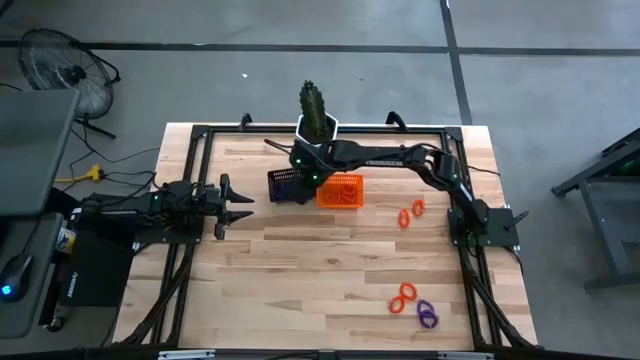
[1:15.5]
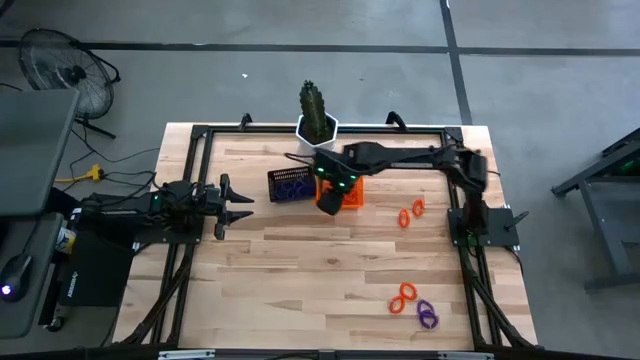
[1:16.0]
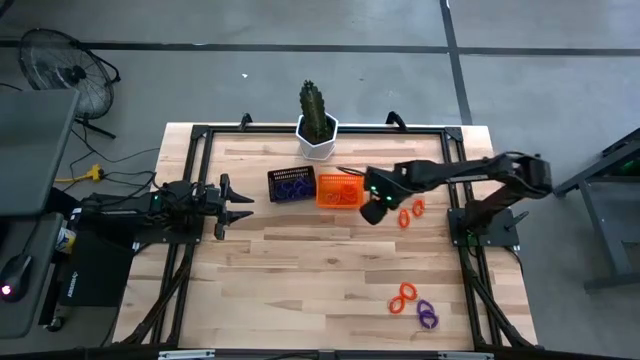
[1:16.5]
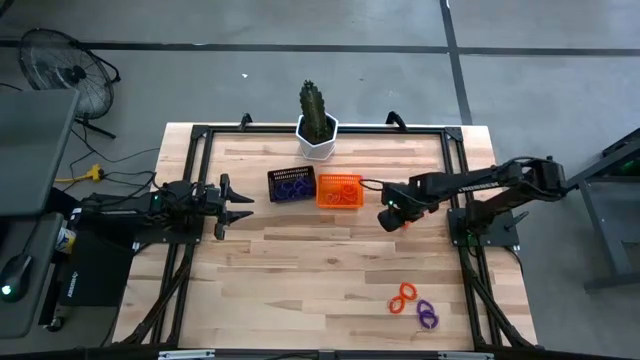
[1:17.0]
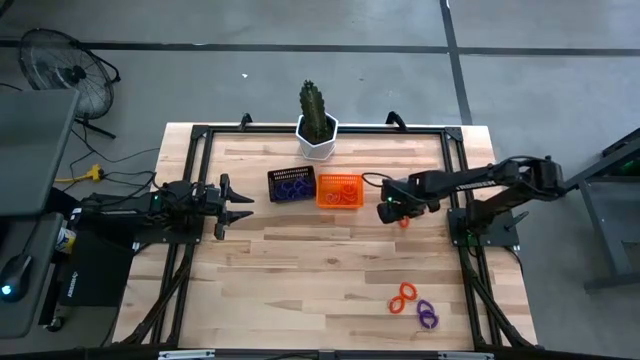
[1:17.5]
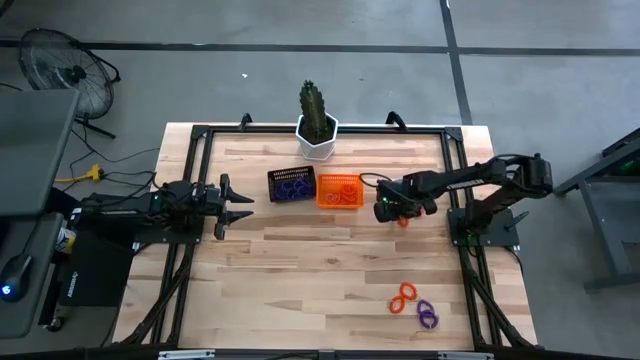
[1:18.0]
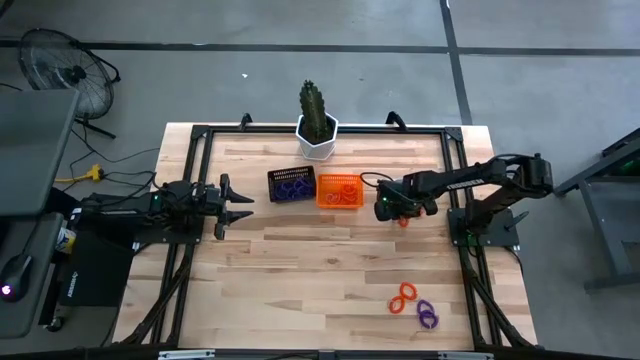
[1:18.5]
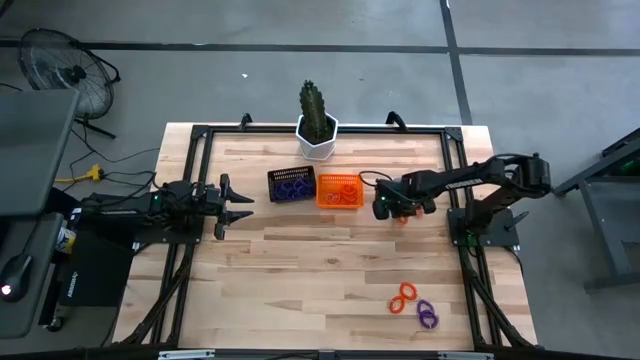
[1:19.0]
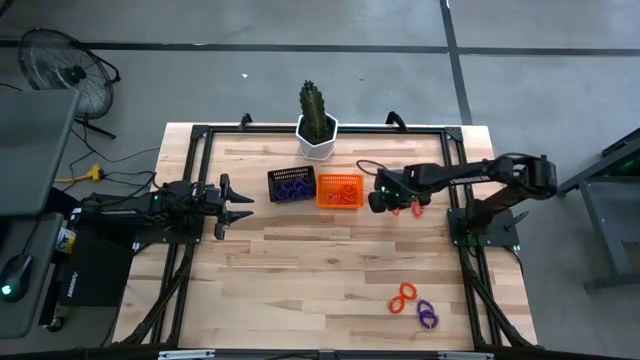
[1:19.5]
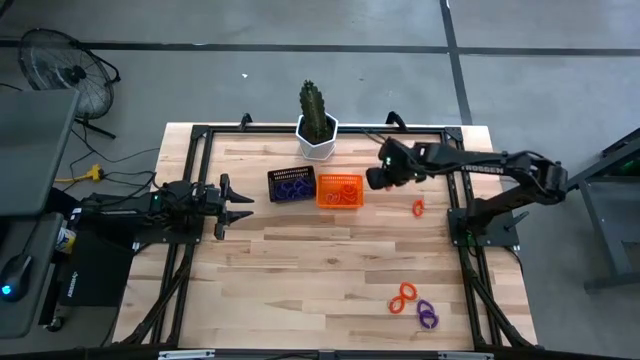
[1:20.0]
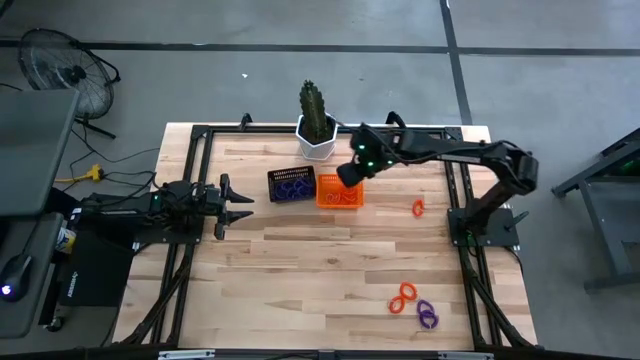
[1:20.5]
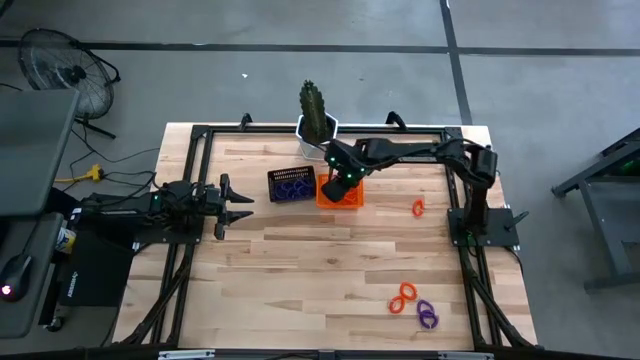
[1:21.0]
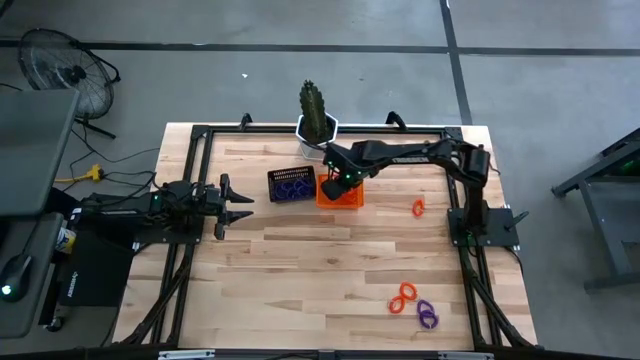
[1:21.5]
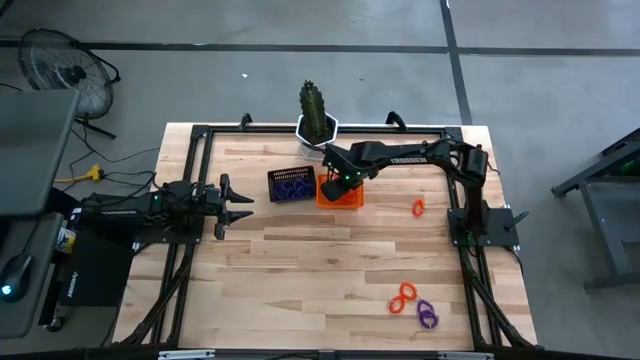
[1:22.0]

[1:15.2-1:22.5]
Task: Sort spring keychains
Put the orange spring keychain in the orange bin

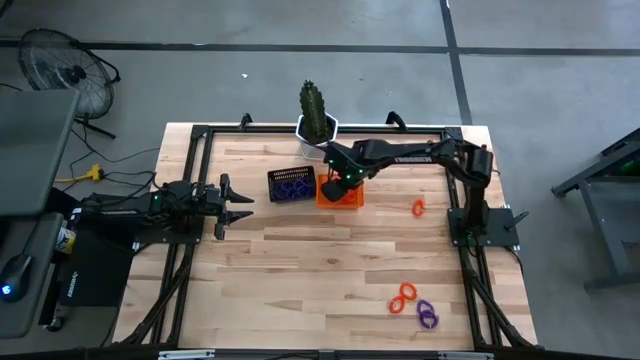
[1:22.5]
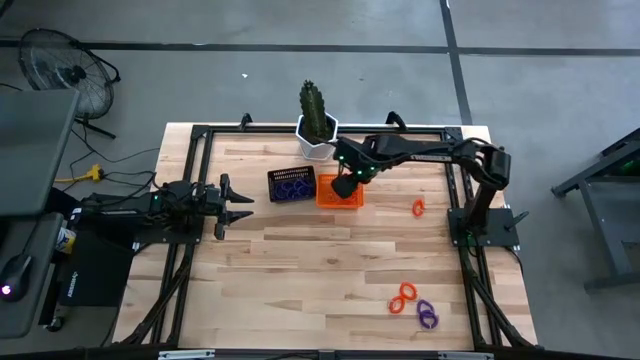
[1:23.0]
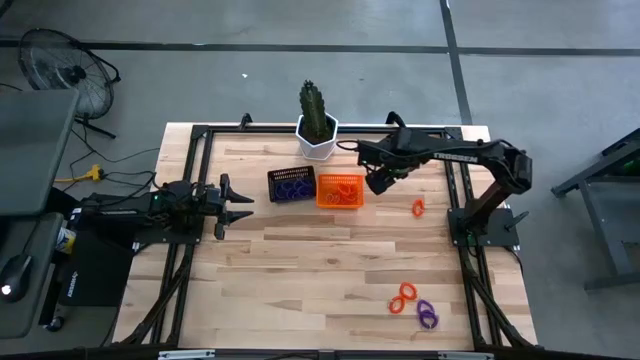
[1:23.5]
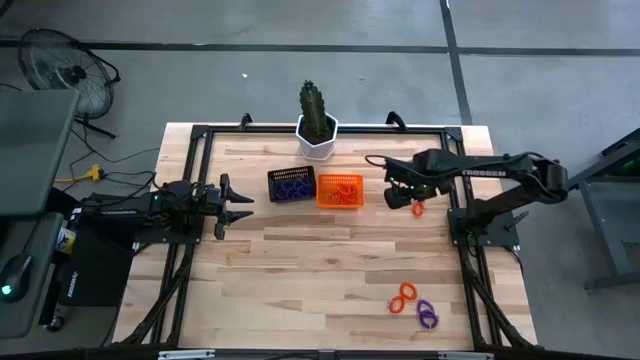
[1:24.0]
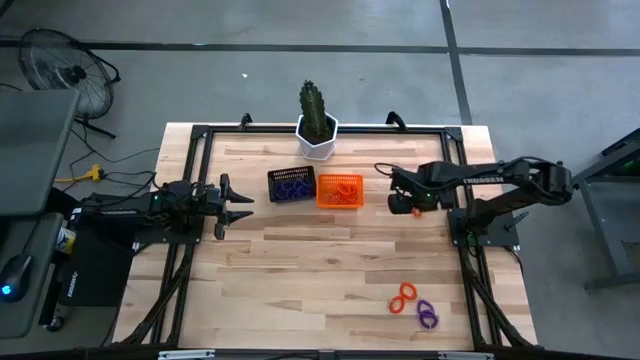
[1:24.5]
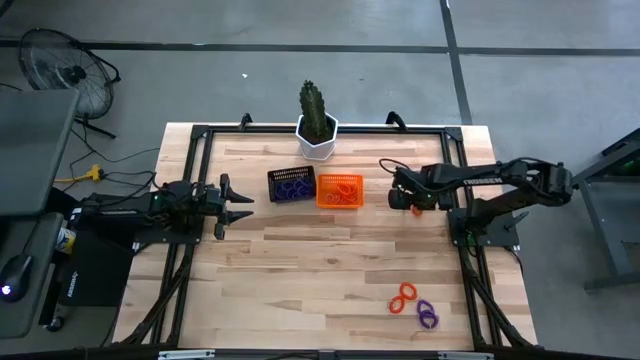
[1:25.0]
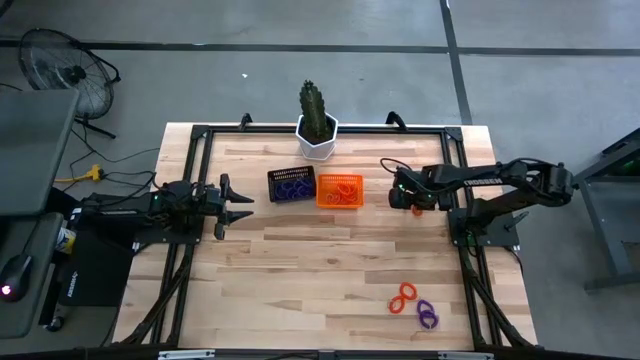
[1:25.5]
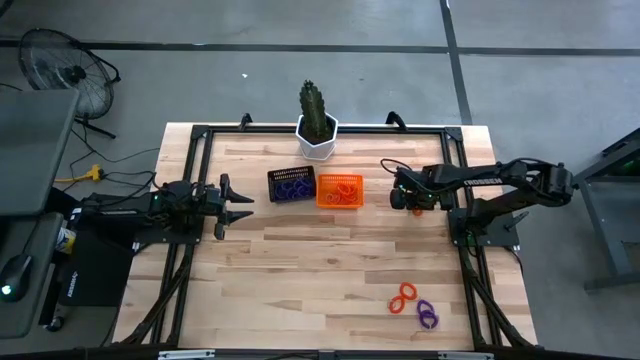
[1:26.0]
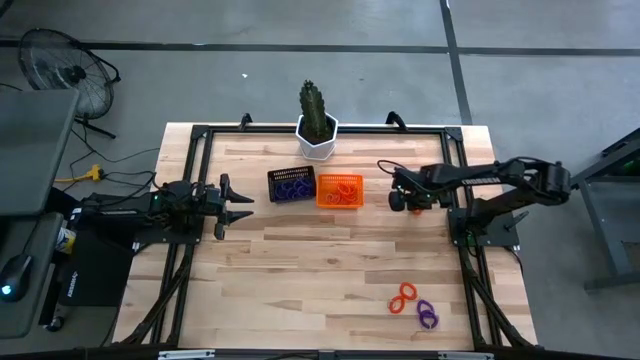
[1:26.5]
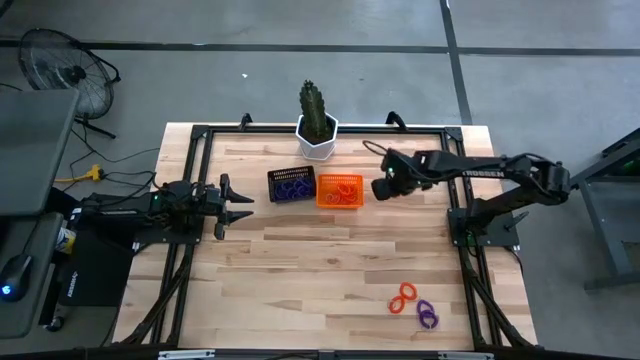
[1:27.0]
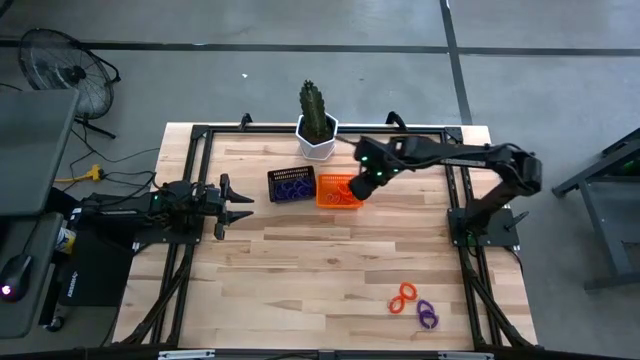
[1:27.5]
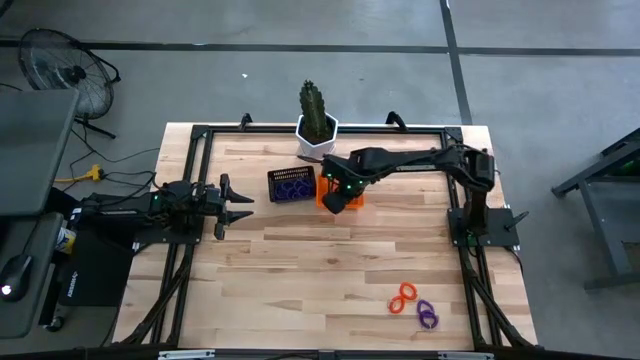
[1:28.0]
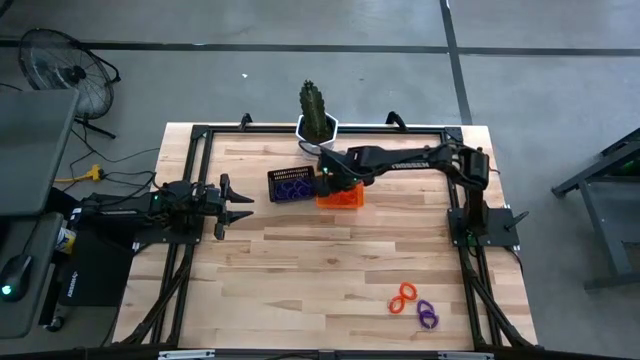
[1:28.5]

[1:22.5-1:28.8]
Put the orange spring keychain in the orange bin

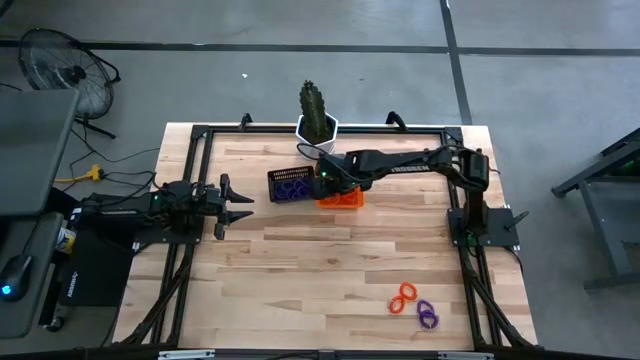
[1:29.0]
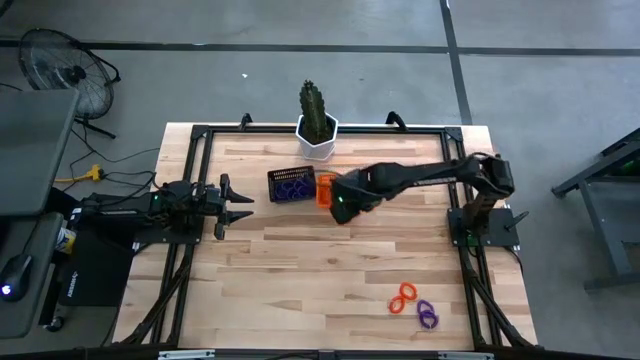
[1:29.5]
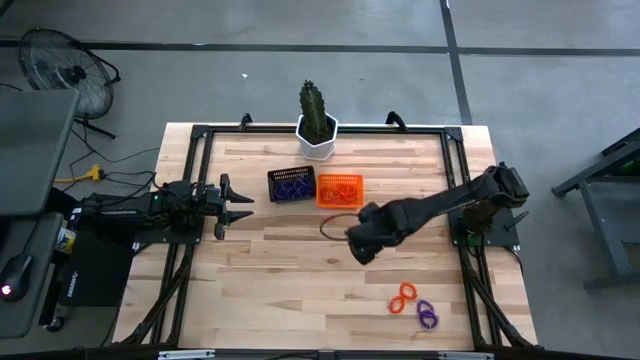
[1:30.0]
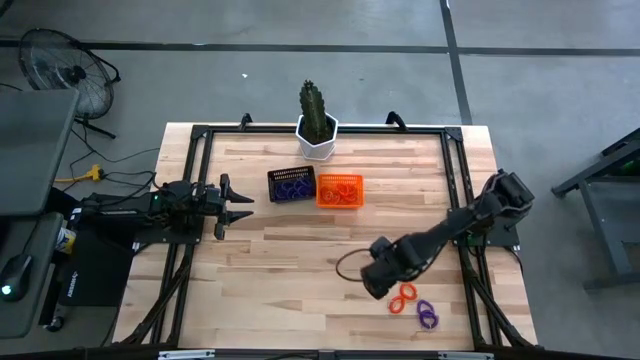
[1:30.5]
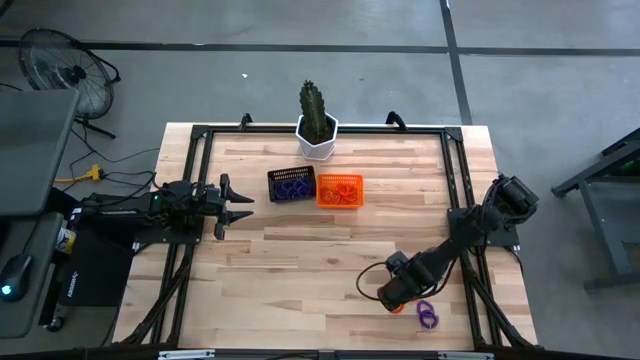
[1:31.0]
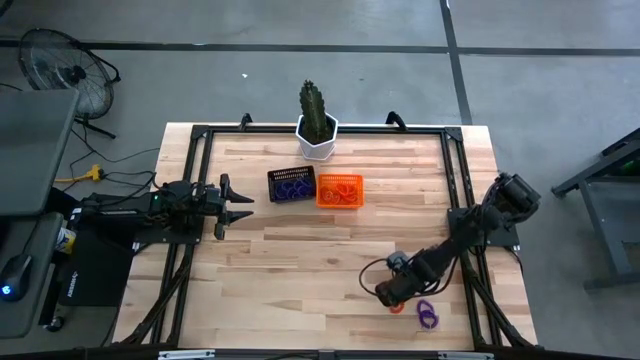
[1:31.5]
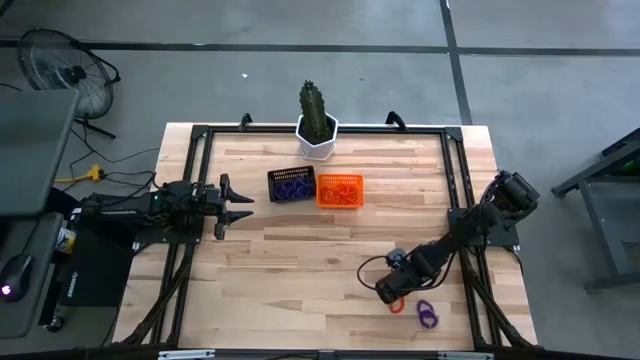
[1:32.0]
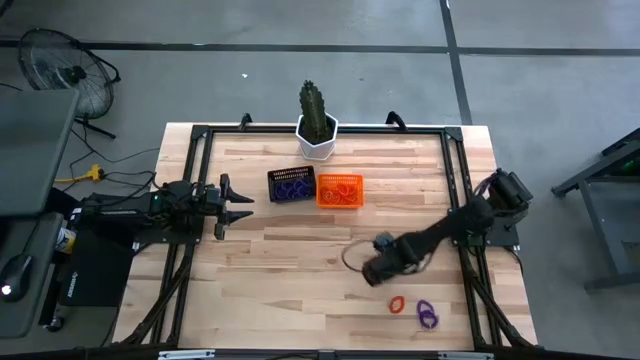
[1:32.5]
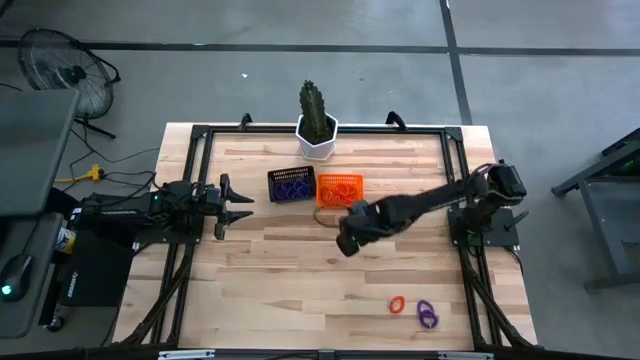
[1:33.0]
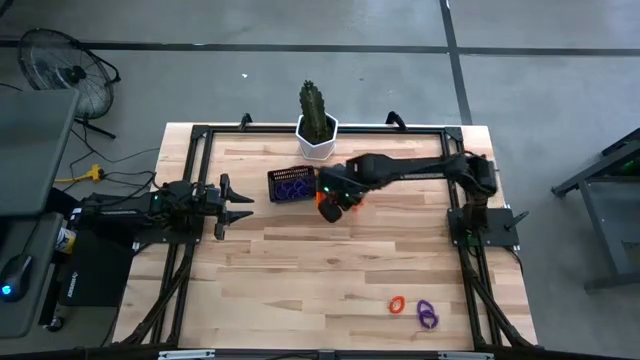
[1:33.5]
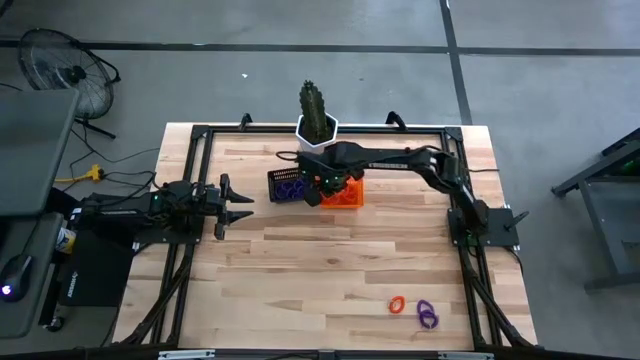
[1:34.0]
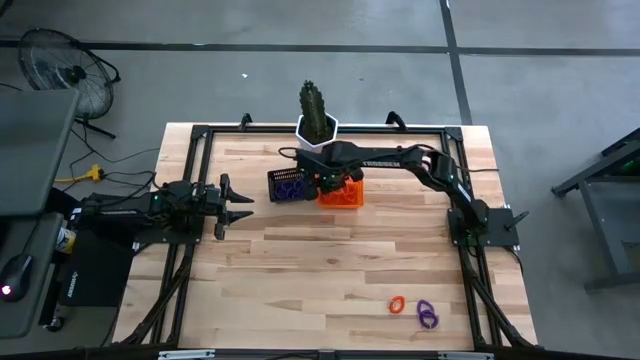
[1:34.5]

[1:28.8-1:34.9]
Put the orange spring keychain in the orange bin

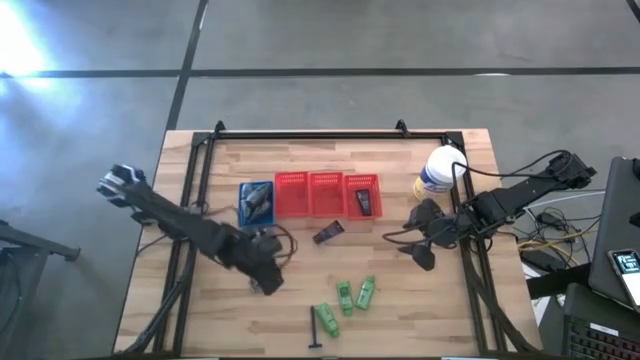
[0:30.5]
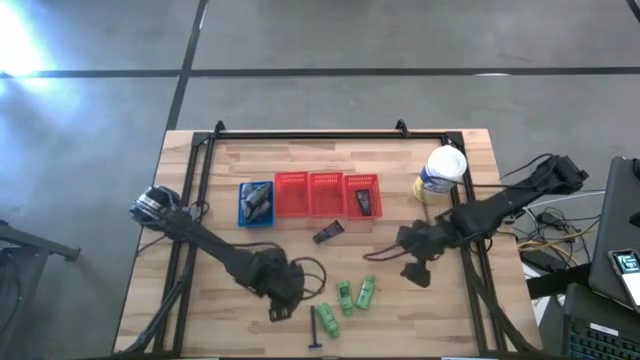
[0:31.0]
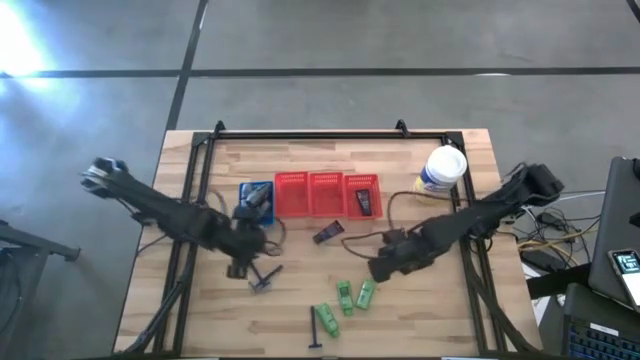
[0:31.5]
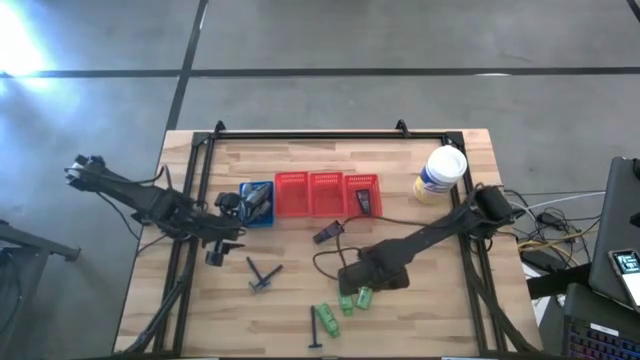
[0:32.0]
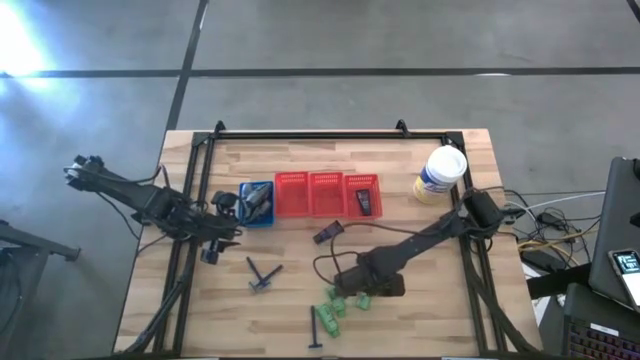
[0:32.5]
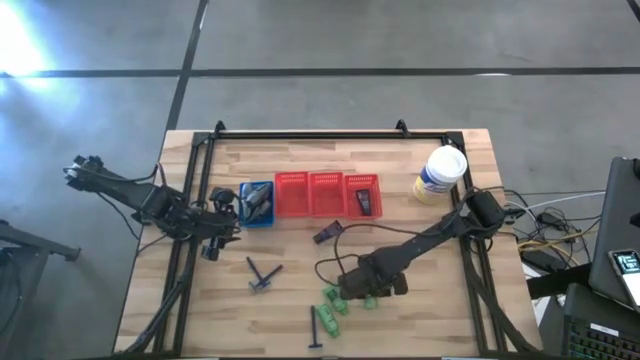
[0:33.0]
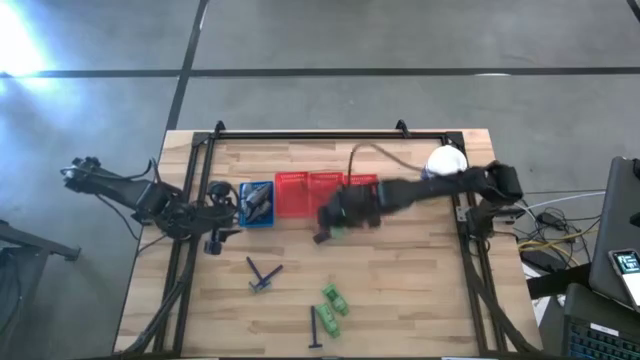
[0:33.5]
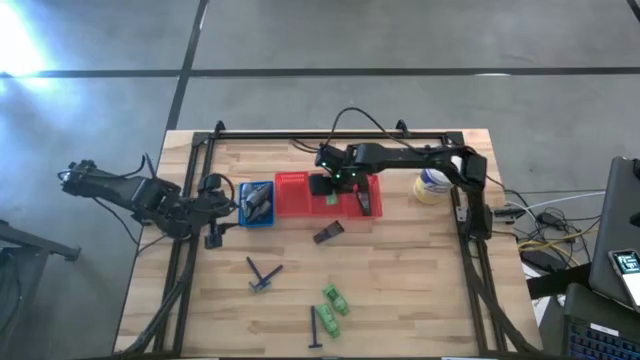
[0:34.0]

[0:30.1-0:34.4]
Task: Pick & Place Travel size toiletries
Put the right green shampoo into the middle red bin
